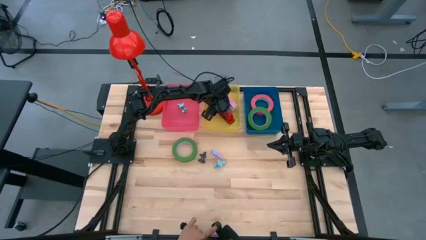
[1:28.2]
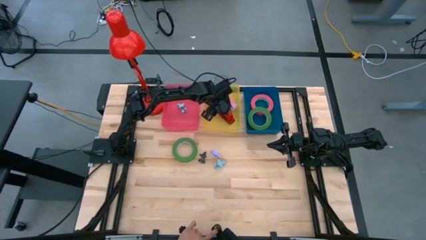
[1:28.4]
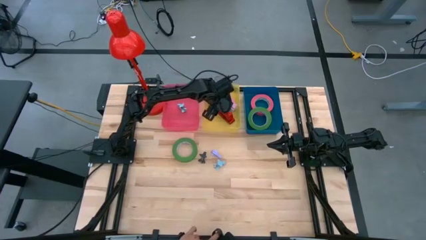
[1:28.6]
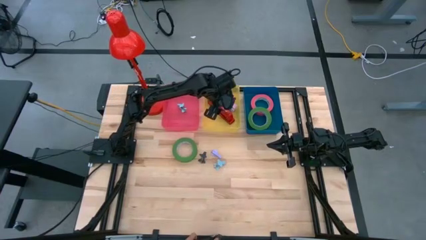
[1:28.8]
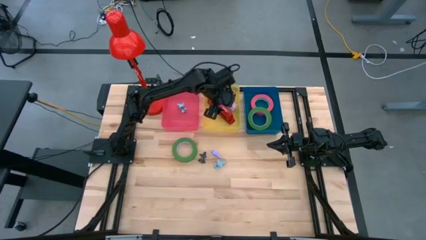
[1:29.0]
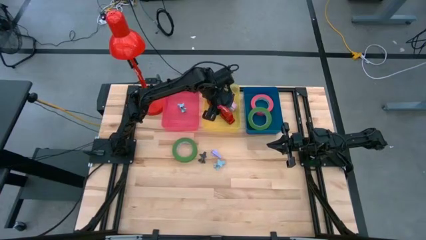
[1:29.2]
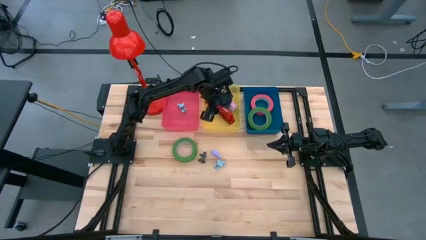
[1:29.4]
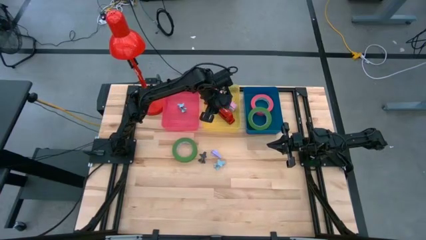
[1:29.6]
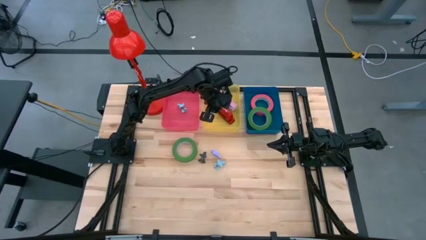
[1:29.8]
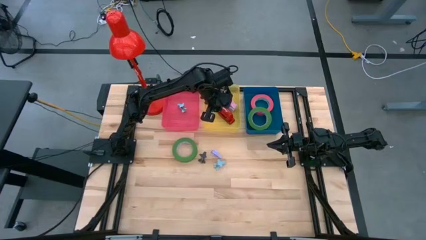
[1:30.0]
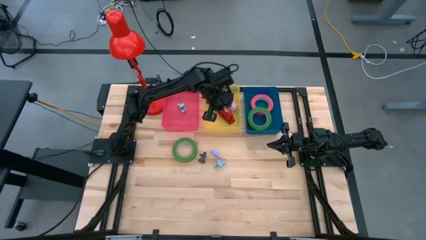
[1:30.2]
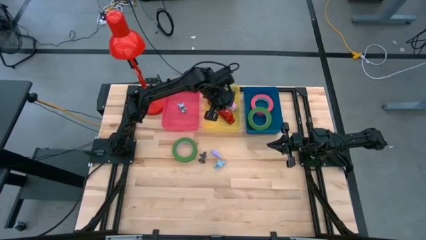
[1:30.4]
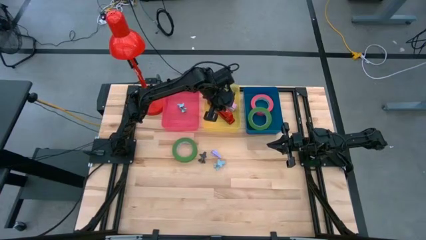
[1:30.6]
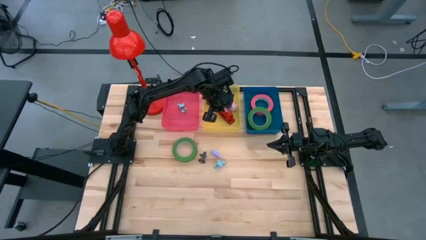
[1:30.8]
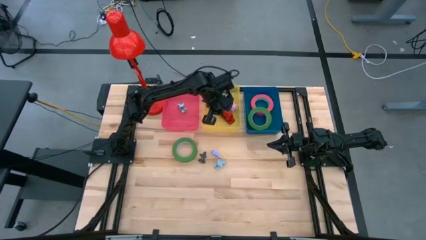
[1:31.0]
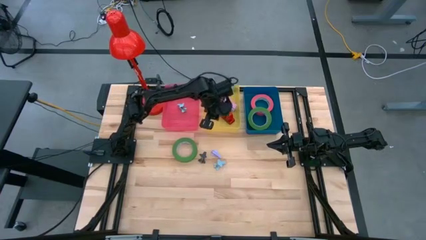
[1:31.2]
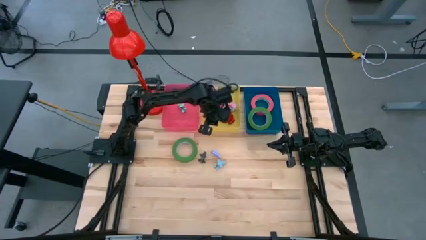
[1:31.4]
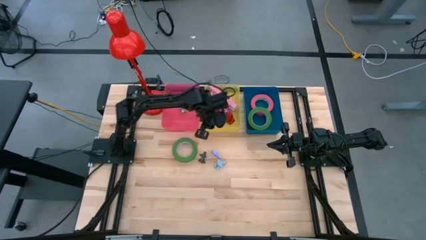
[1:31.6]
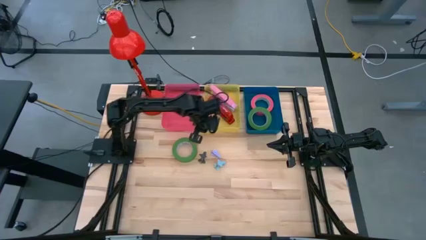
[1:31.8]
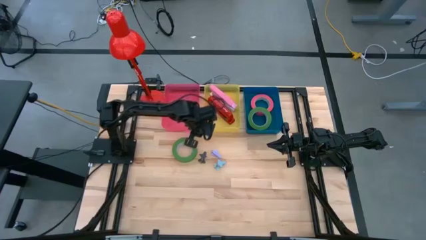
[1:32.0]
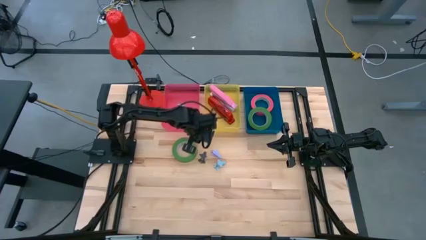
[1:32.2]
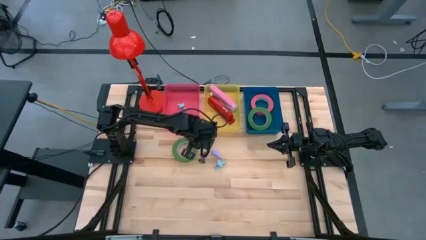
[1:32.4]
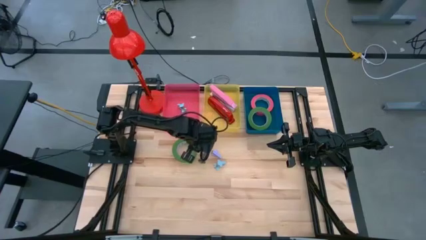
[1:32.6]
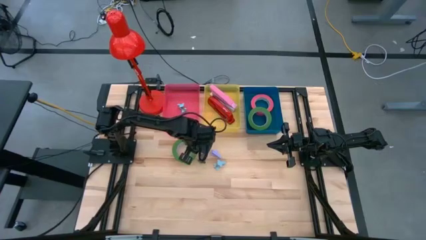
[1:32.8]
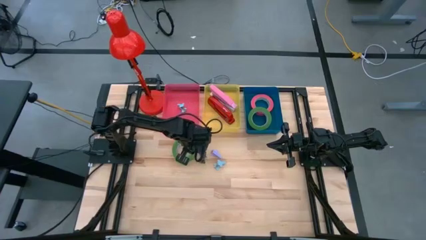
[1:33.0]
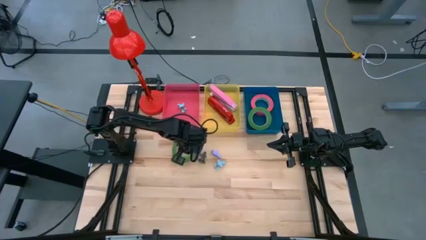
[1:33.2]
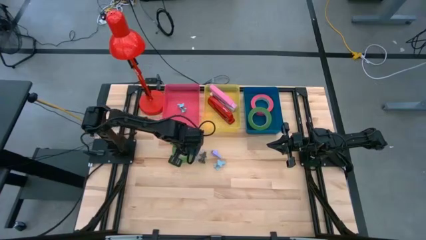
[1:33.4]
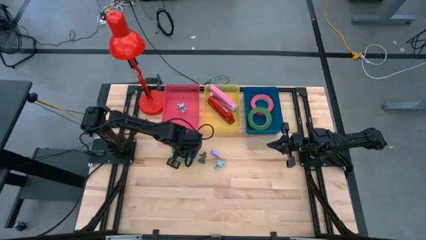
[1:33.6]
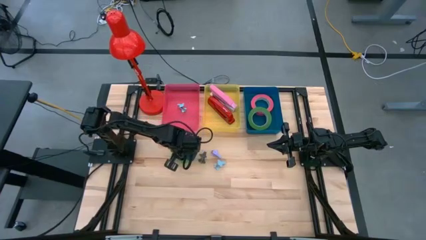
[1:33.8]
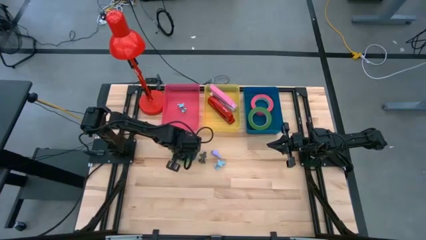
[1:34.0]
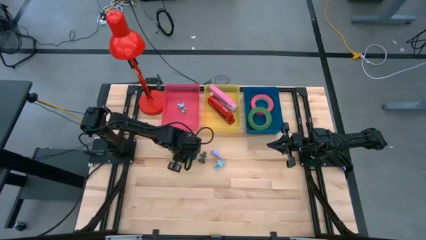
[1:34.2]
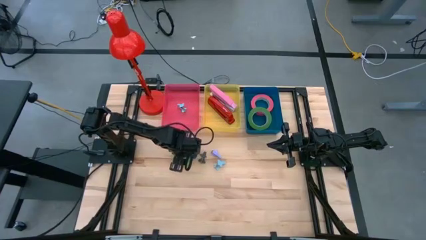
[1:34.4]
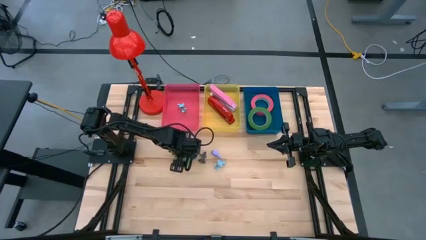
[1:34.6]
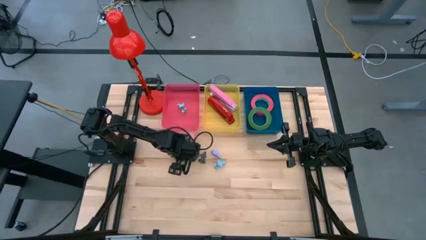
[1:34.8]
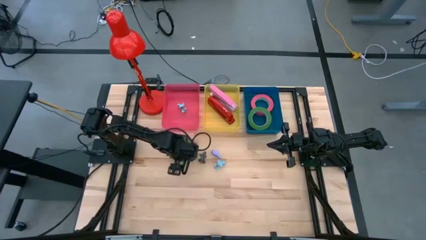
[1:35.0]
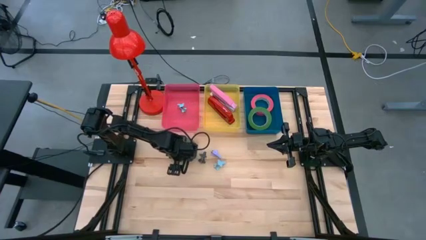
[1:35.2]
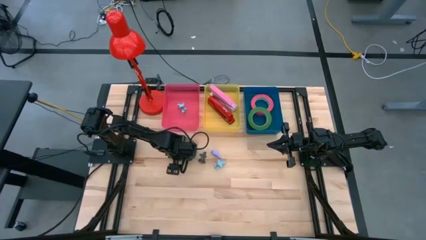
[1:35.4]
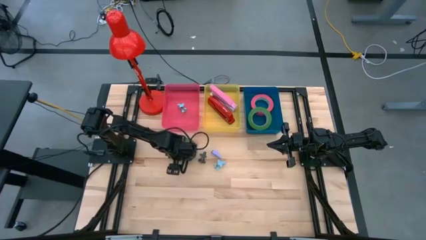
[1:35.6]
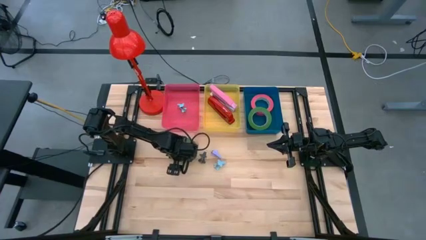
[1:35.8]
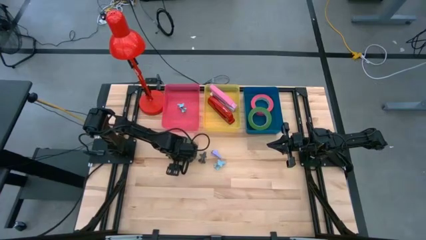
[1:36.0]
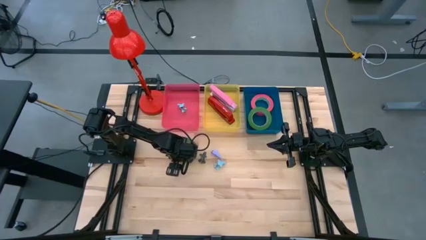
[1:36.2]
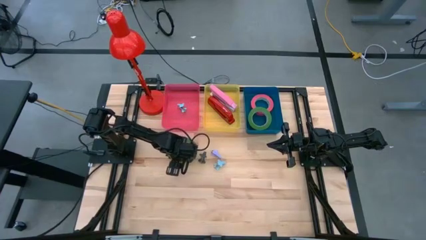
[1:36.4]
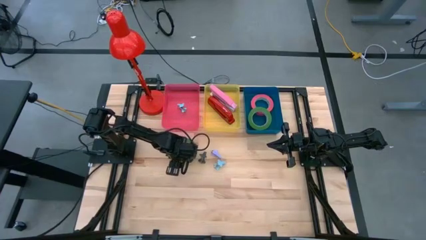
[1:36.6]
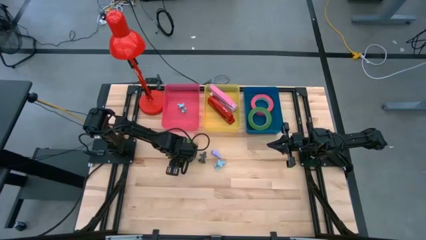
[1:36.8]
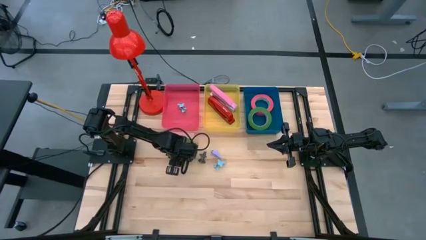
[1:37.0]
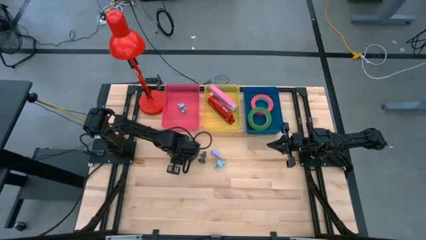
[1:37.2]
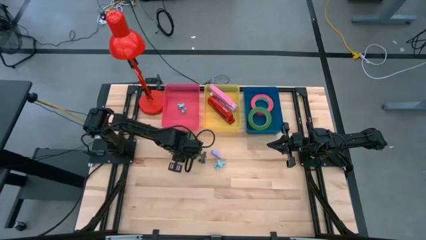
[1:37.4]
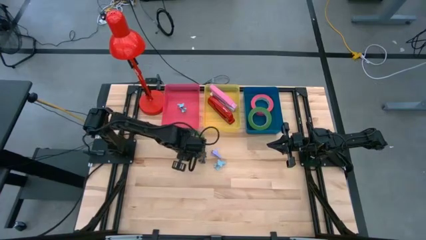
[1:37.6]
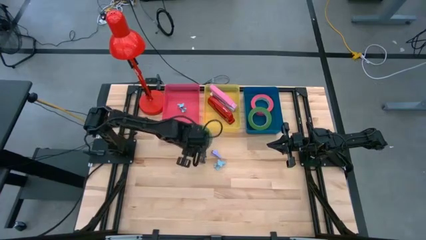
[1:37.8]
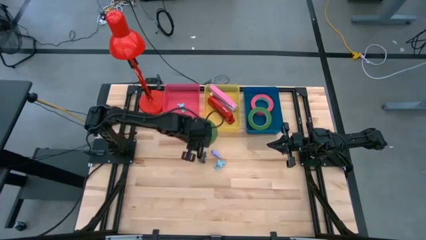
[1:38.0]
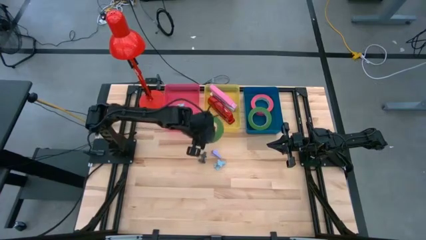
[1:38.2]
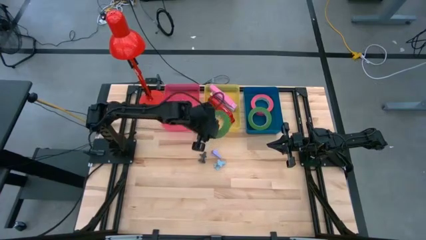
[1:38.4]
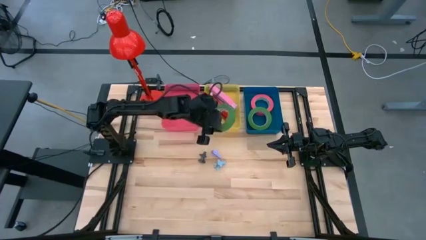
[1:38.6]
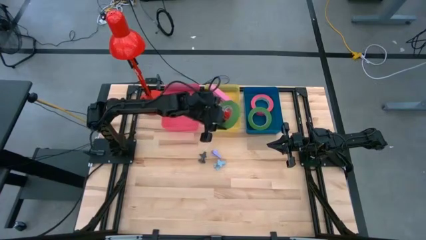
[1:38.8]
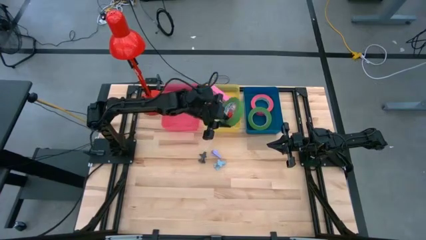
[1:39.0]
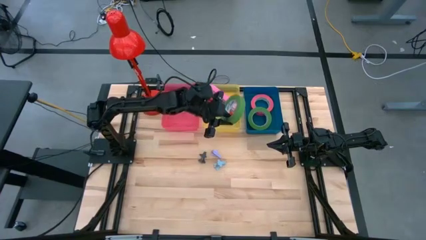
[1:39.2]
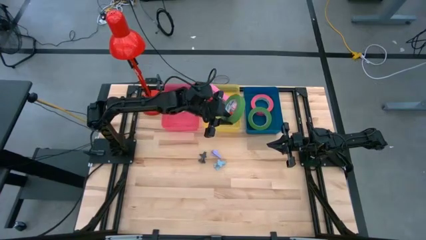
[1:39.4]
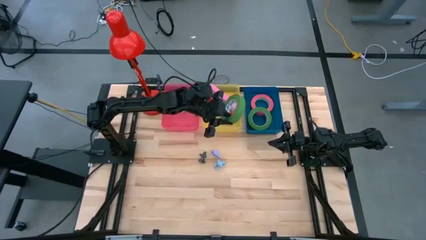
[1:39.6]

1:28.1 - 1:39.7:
Task: Pick and place Stapler, Stapler remover, tape
Put the green tape into the blue bin

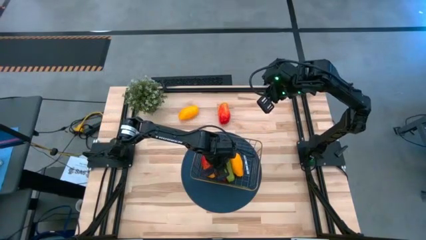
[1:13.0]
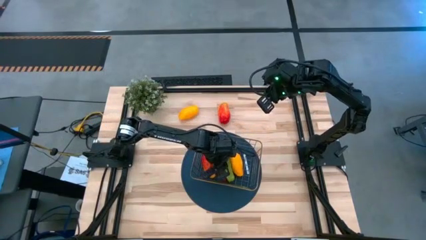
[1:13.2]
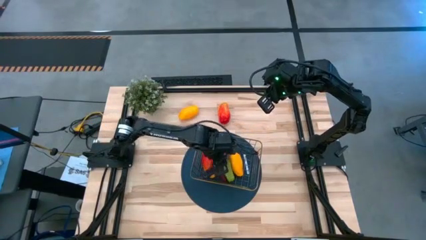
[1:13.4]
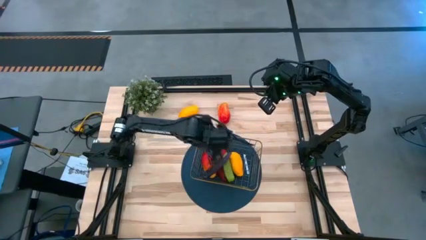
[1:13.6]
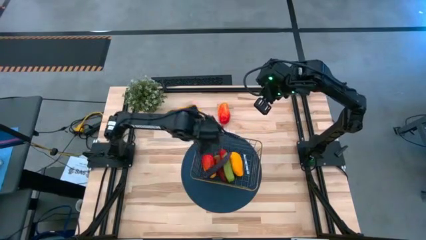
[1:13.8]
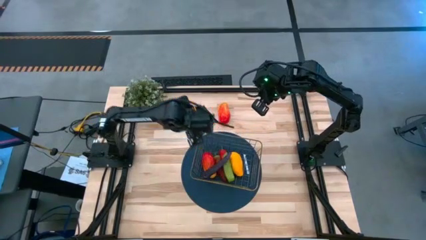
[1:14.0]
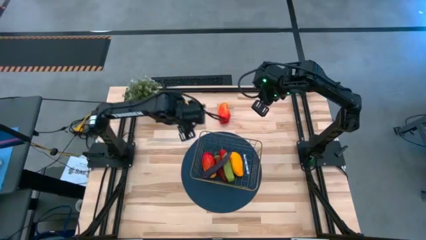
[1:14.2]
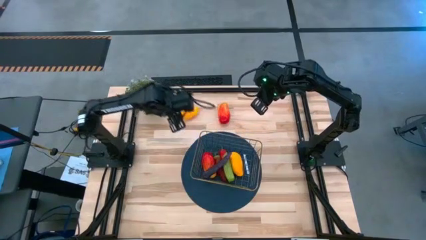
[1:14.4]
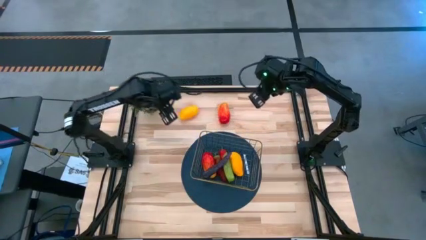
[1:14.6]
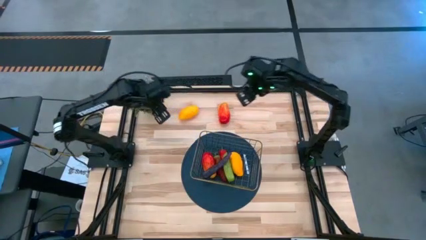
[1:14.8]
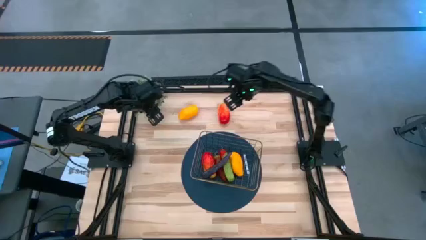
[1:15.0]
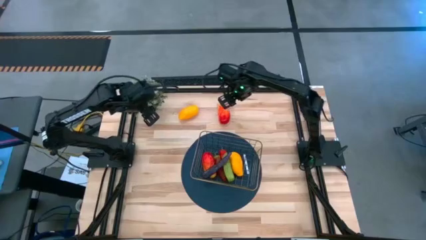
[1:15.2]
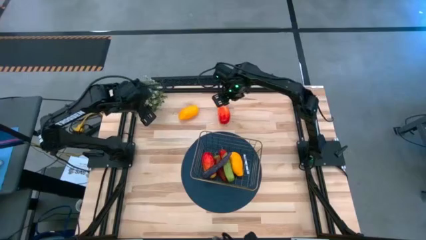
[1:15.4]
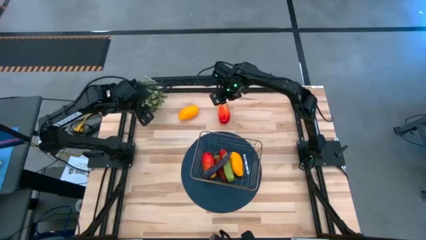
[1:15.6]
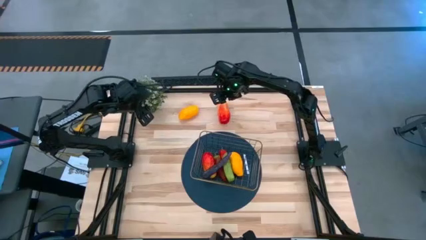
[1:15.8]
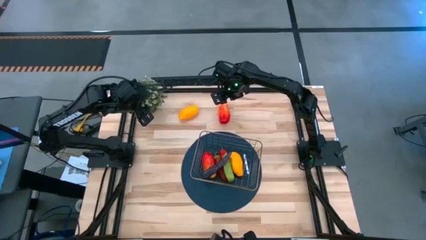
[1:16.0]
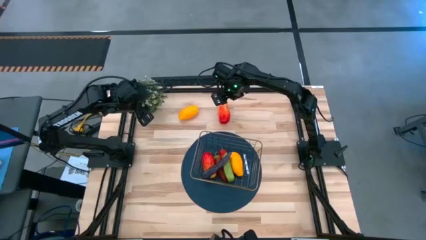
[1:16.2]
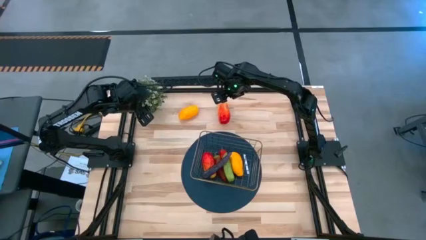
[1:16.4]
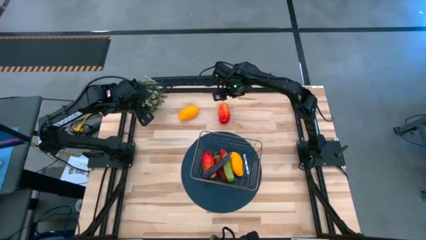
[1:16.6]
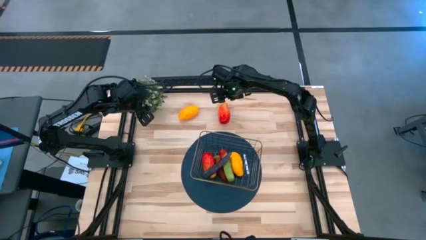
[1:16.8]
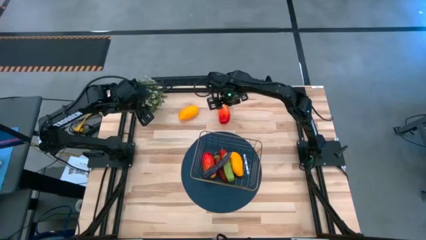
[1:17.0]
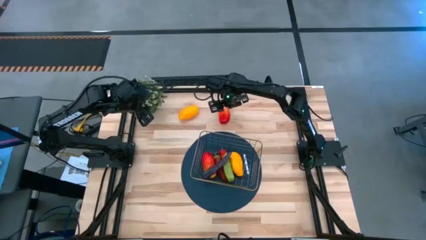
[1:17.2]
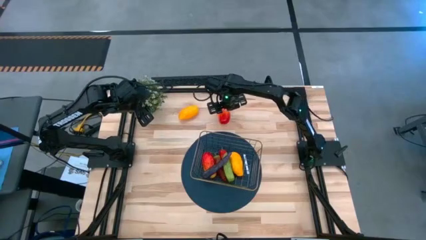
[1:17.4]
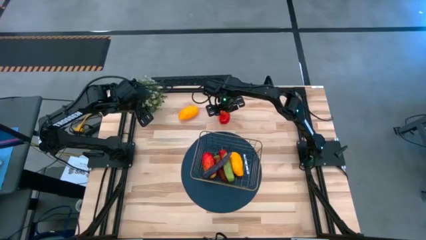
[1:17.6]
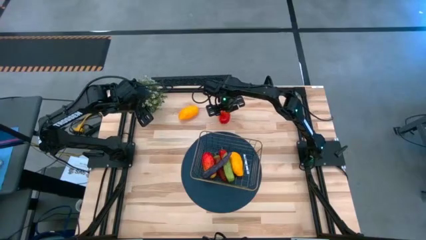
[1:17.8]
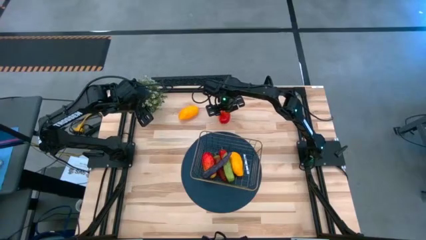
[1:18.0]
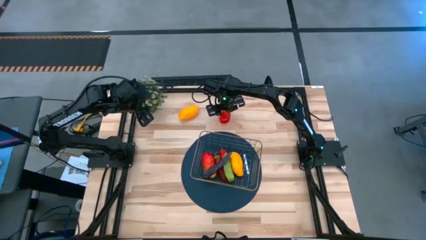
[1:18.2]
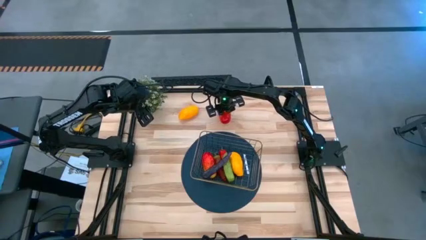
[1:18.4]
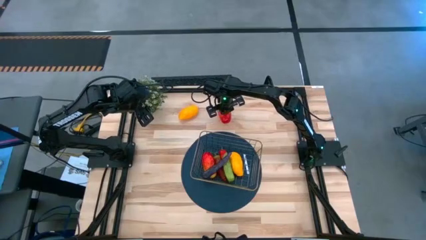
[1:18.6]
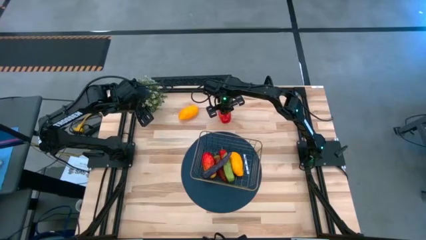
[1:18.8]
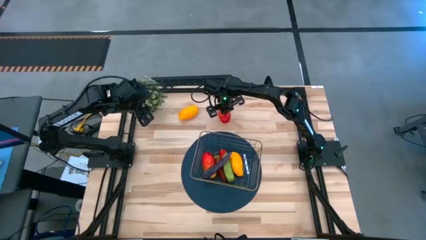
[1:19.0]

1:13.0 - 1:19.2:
Task: Build produce basket
Put the red mango into the gold wire basket
